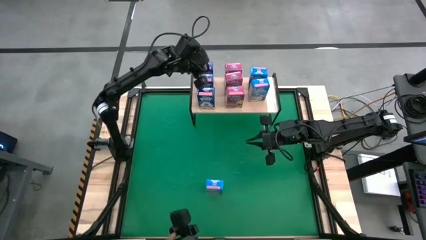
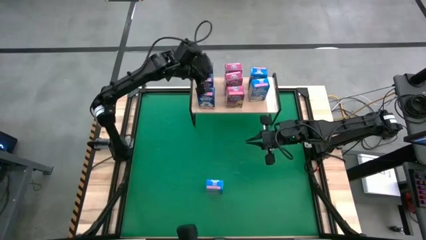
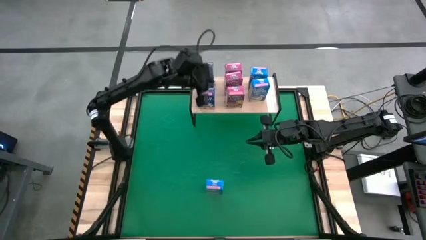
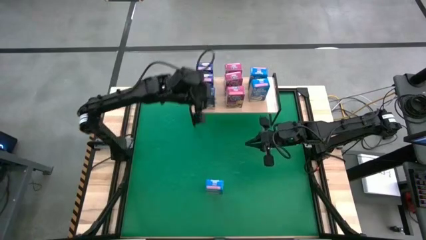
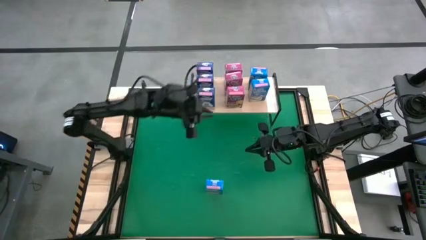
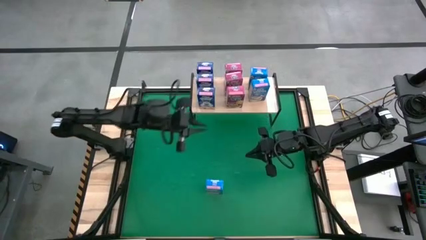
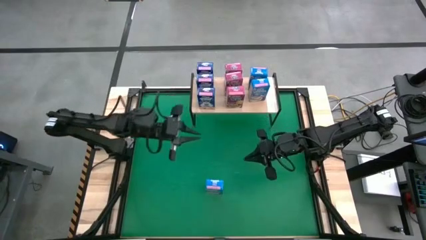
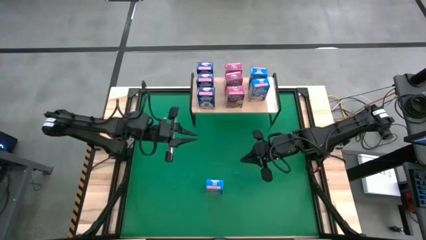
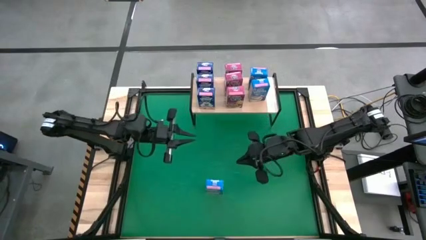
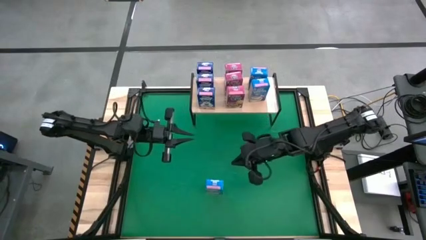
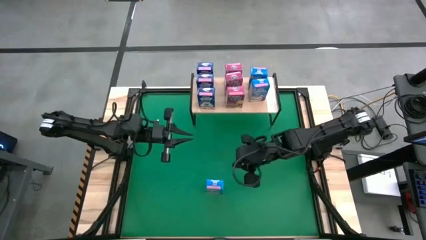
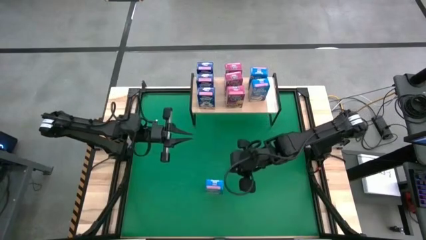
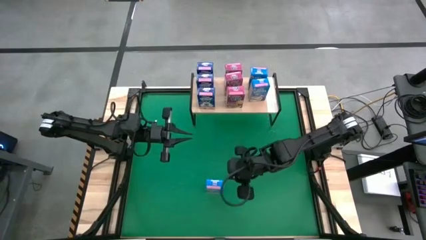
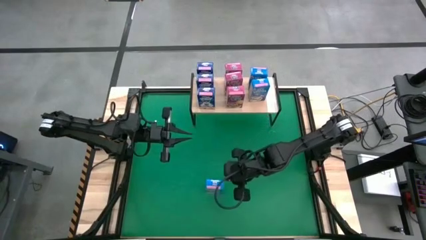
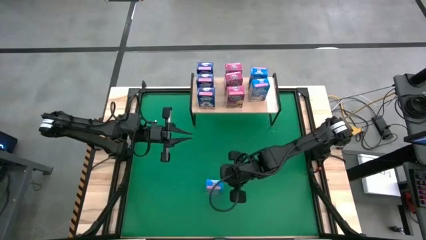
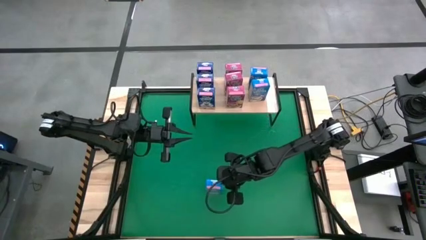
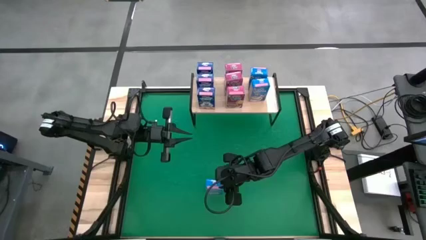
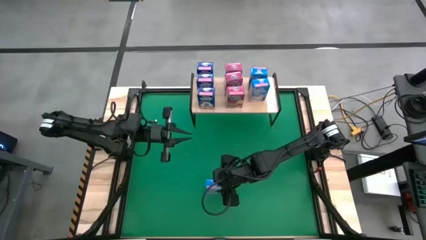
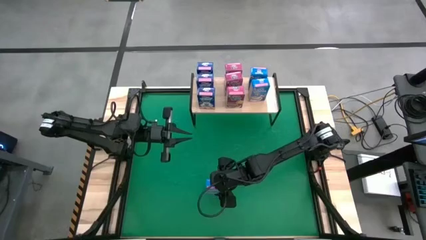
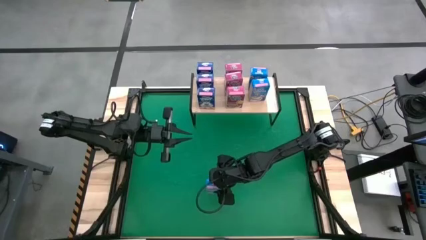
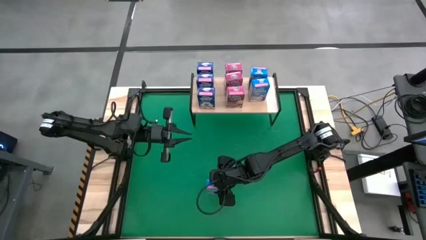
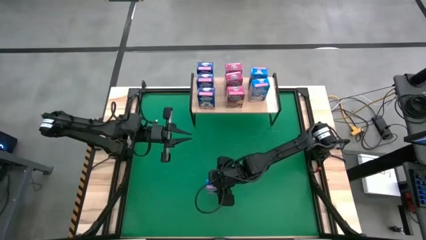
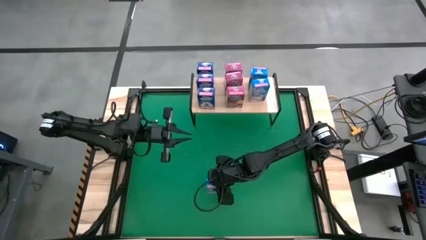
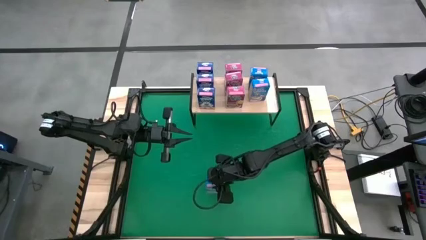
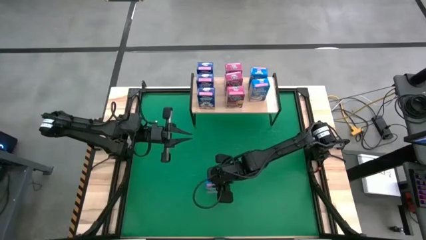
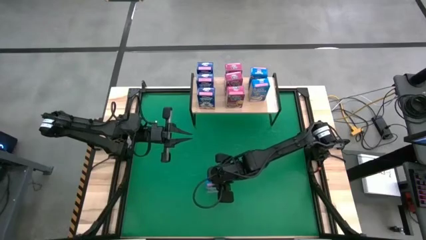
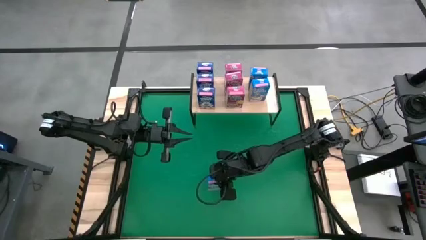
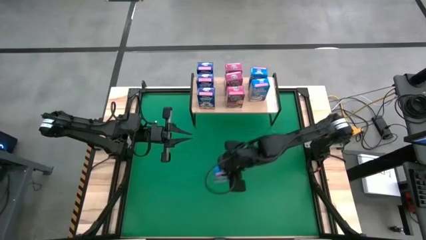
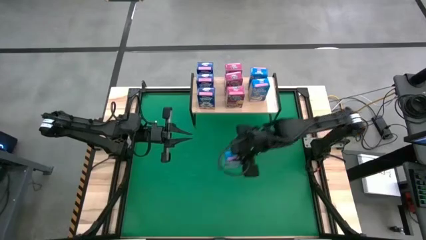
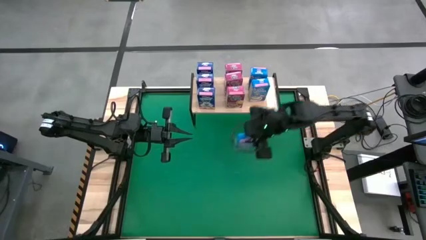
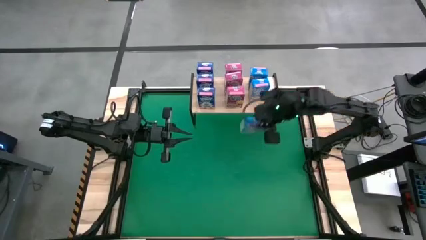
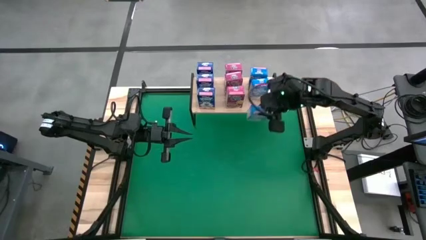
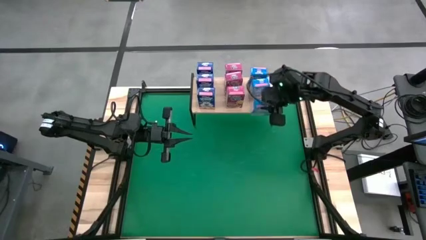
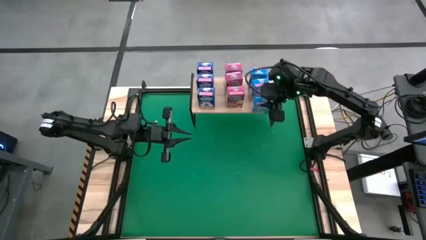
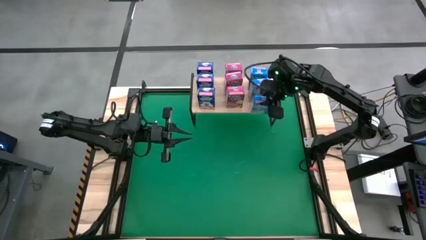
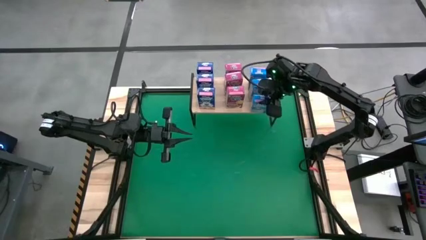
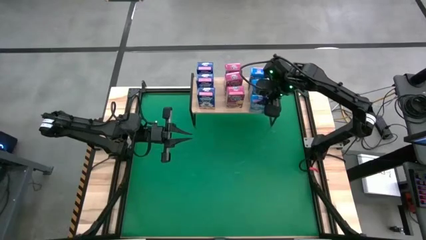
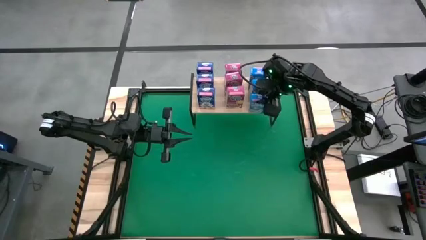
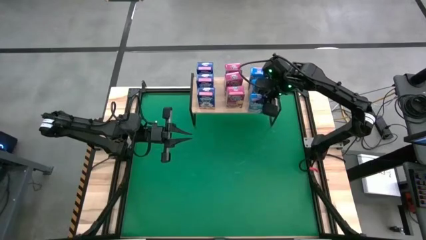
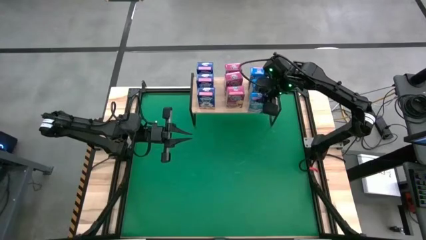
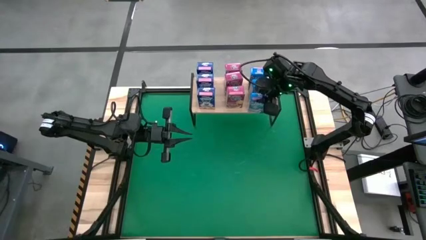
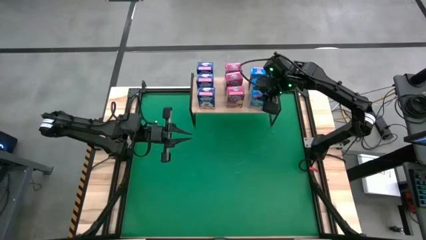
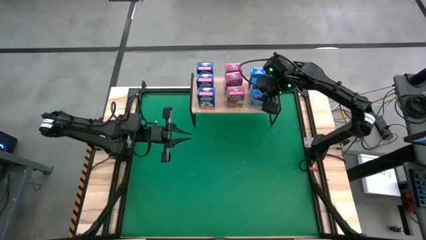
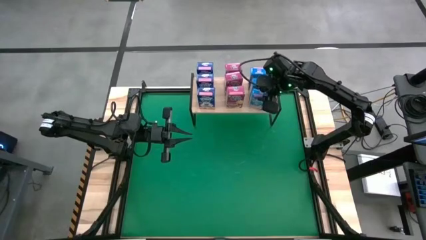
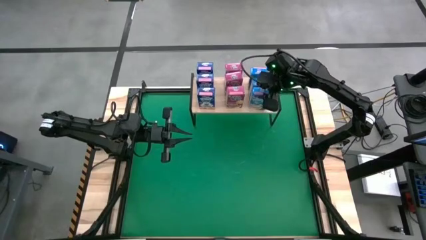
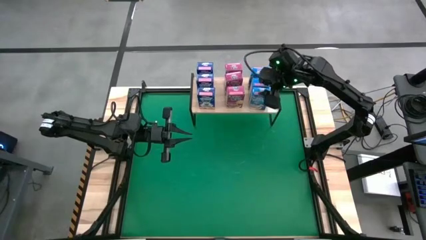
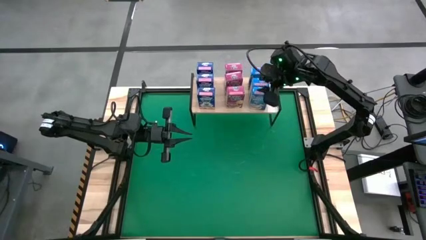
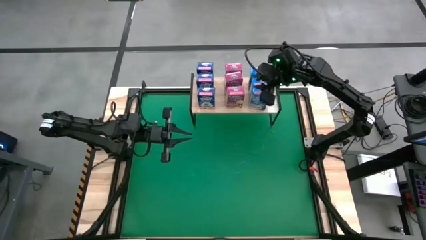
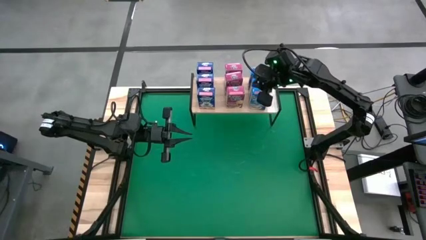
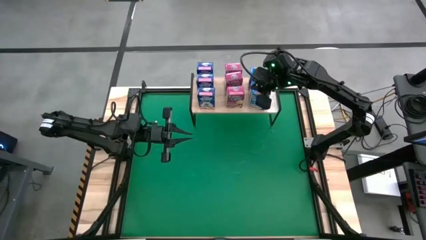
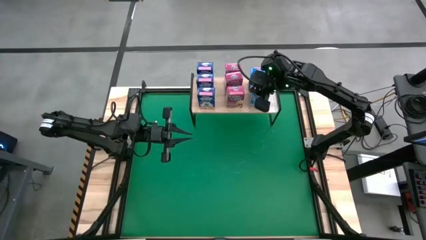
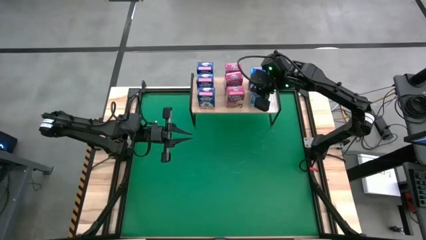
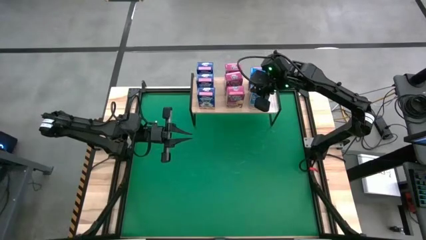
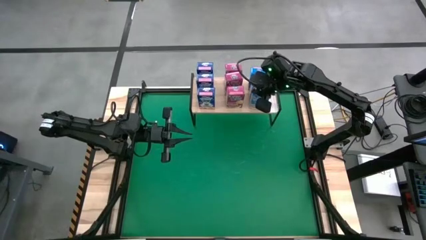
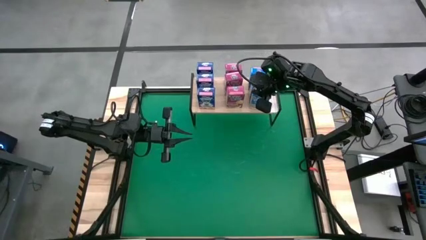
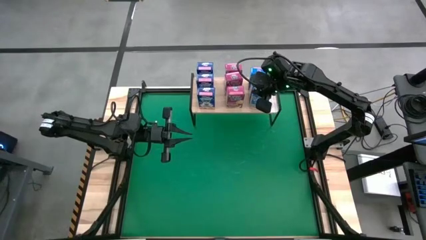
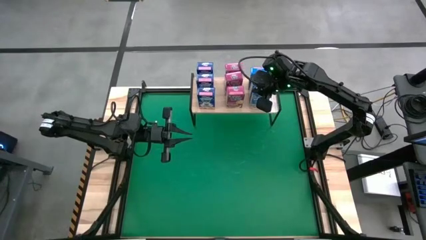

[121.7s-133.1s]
Task: Stack cereal on shelf
Put the light blue cereal box on the shelf aligned with the other light blue cereal boxes

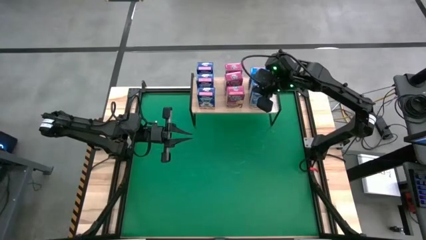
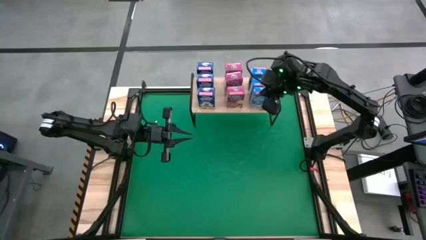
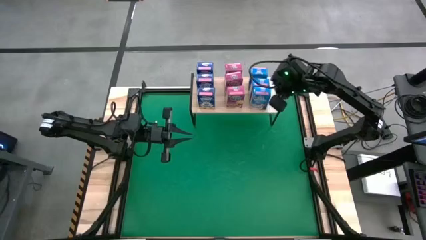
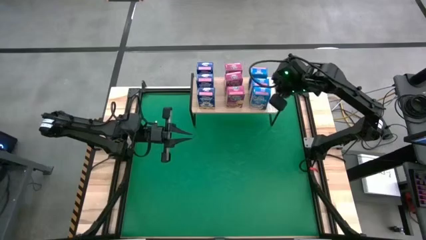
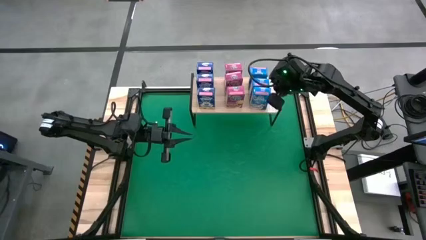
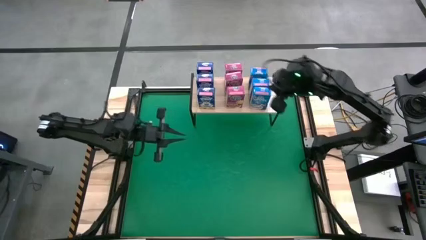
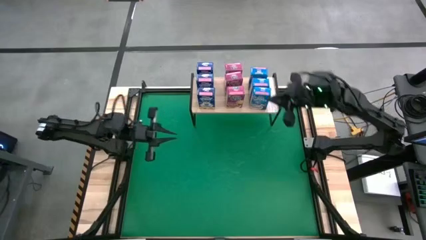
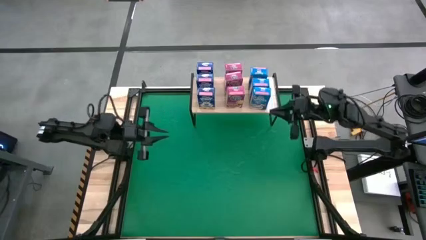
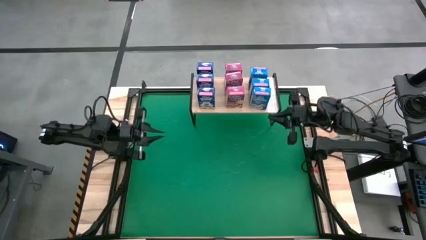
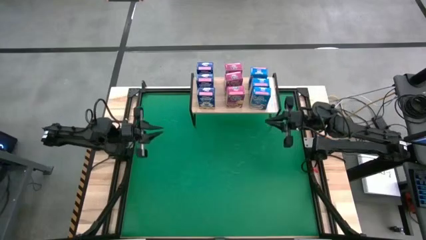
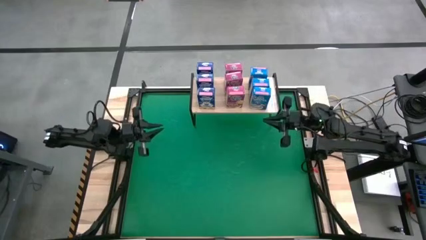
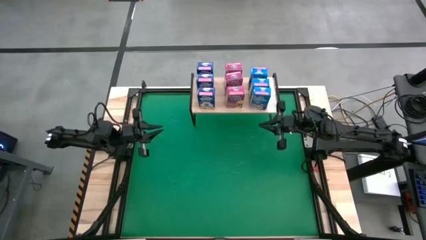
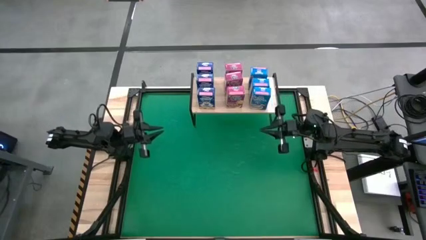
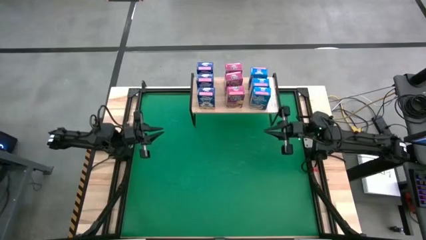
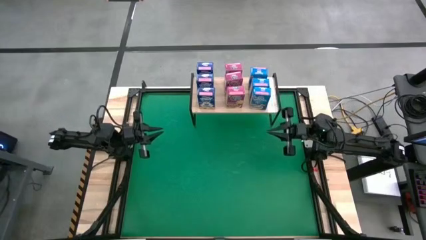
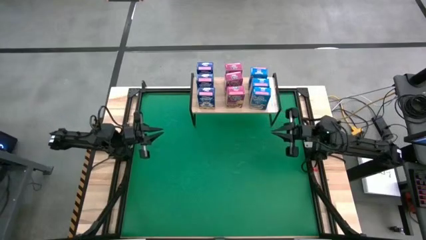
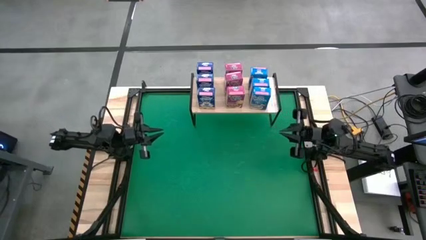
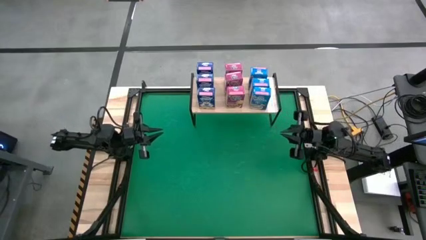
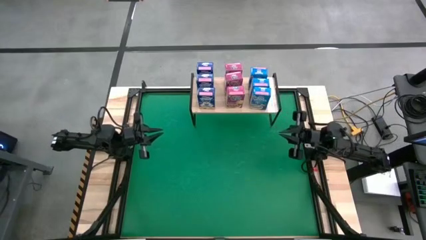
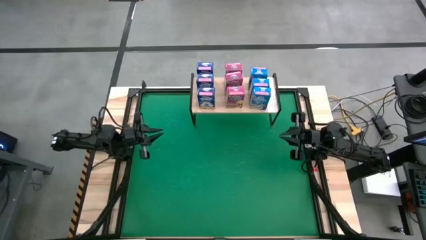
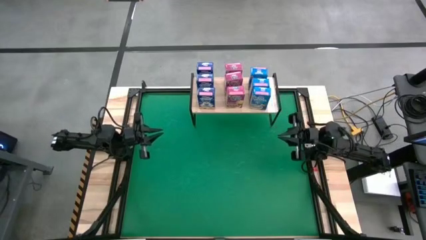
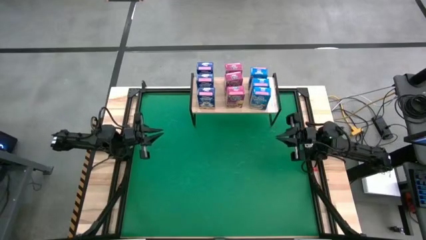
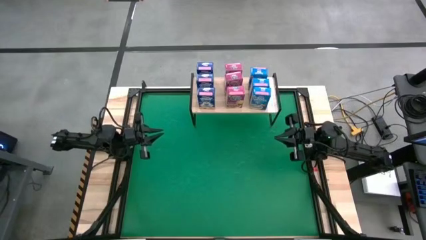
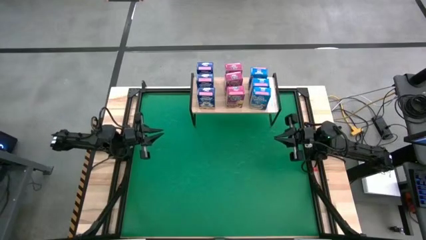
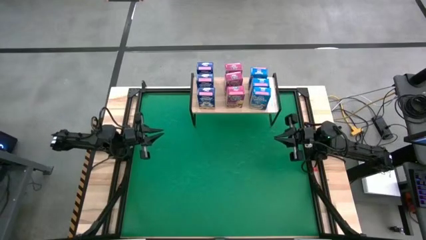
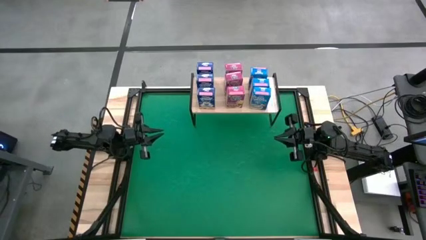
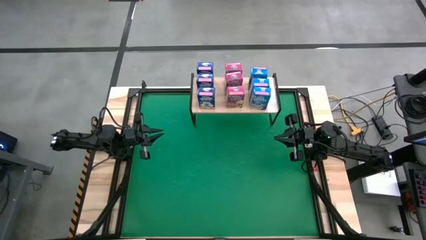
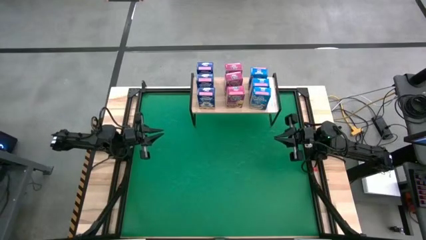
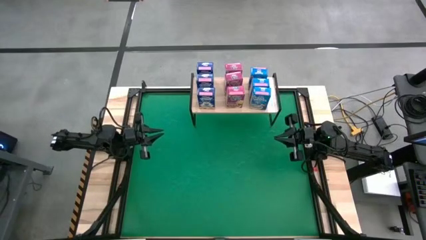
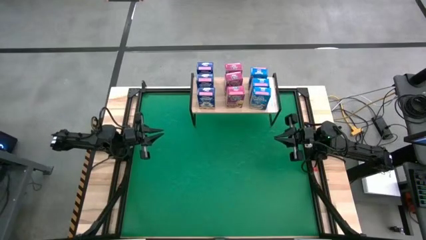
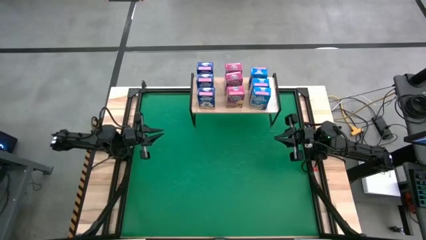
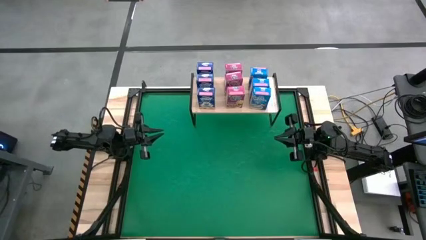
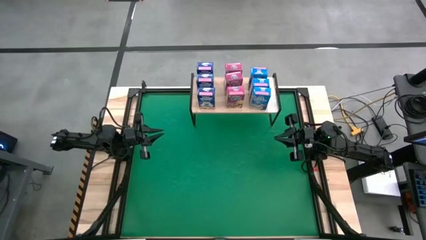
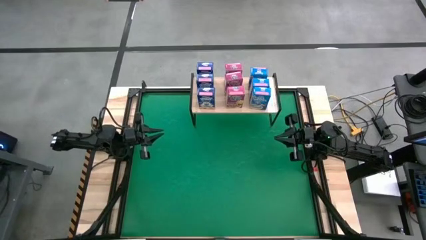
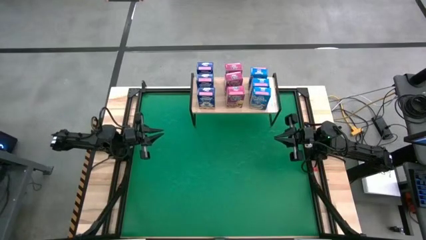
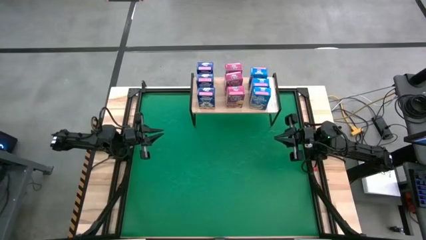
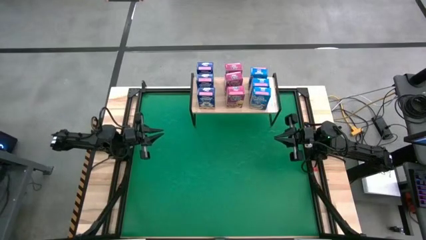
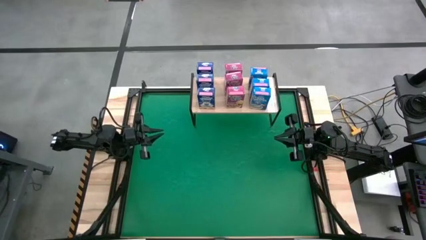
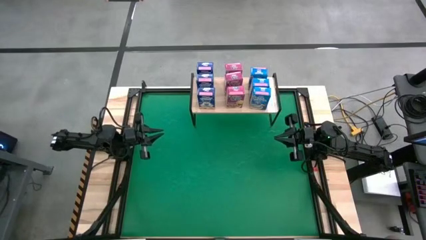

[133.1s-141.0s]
Return to Home Position
